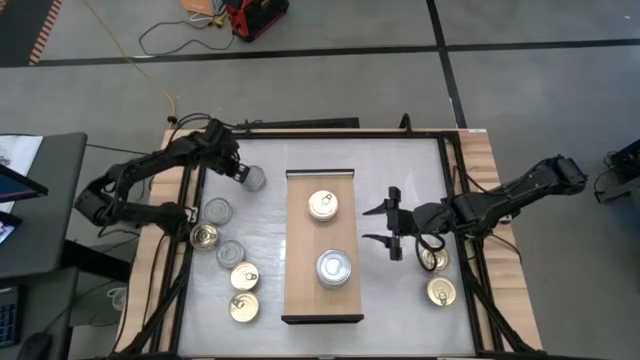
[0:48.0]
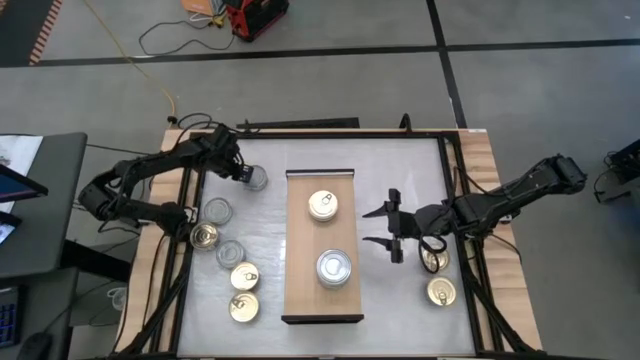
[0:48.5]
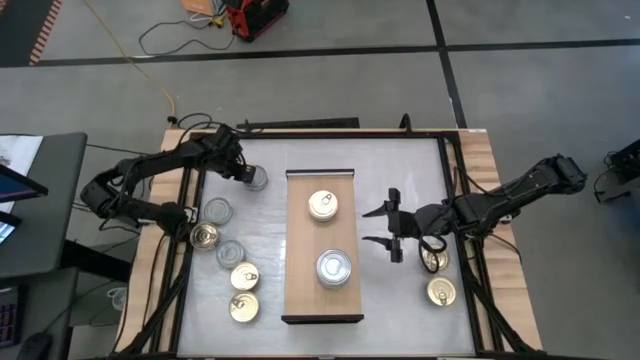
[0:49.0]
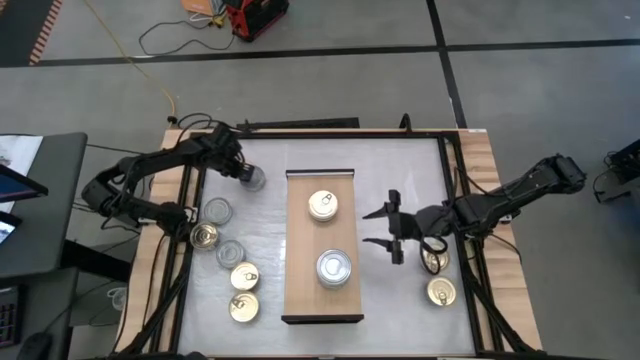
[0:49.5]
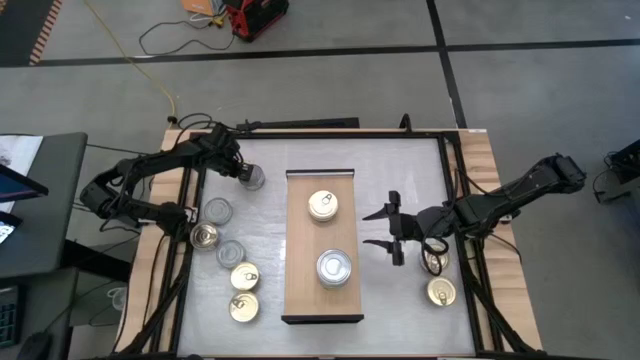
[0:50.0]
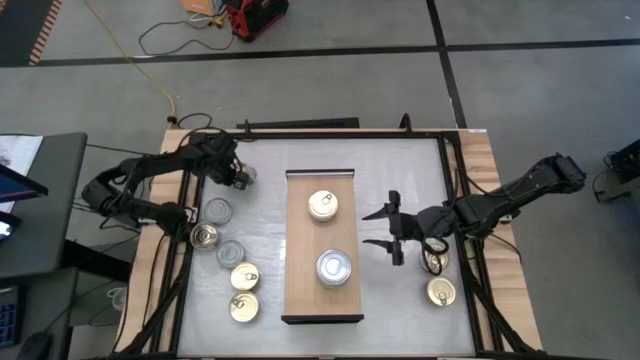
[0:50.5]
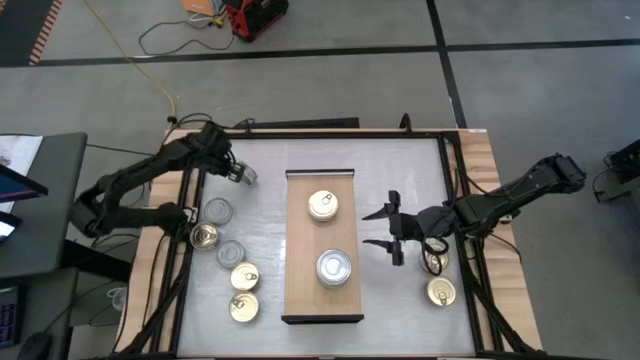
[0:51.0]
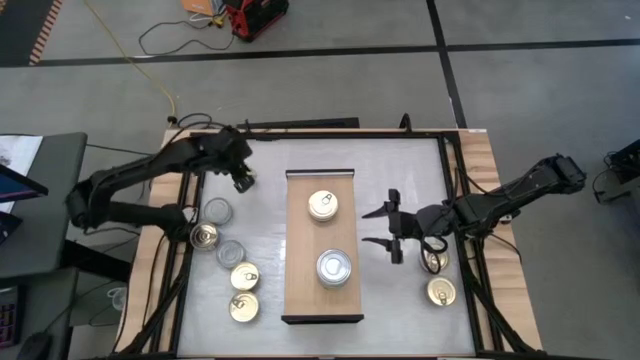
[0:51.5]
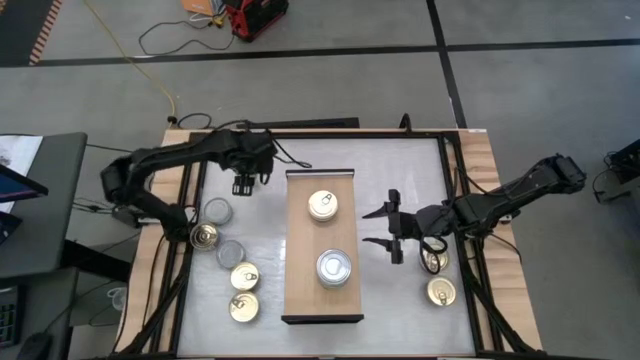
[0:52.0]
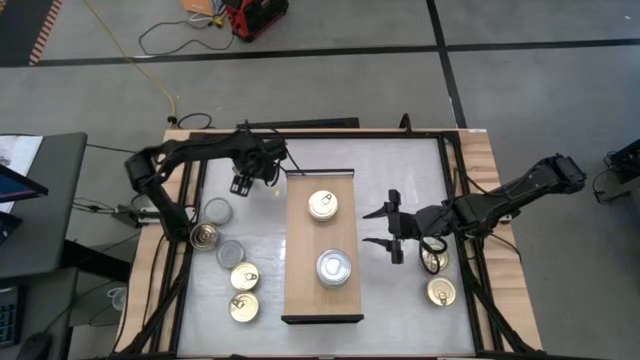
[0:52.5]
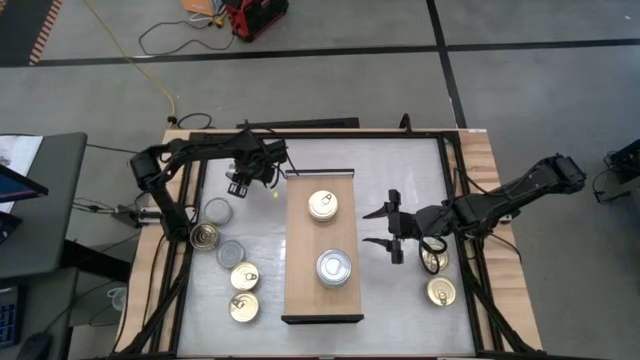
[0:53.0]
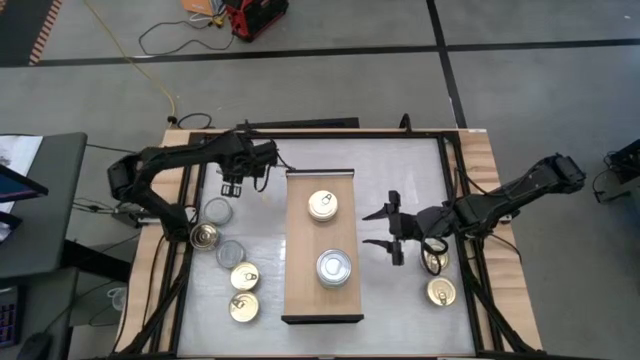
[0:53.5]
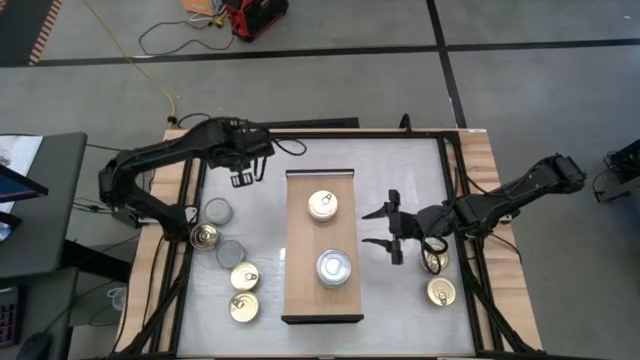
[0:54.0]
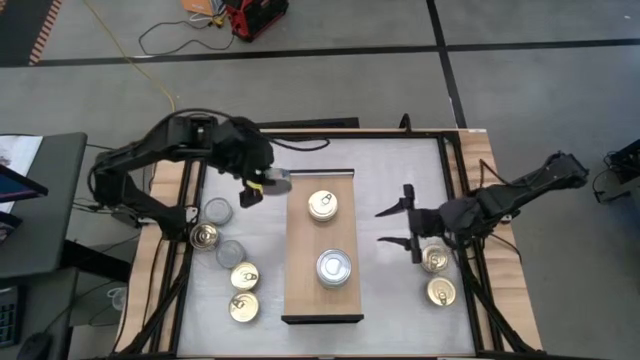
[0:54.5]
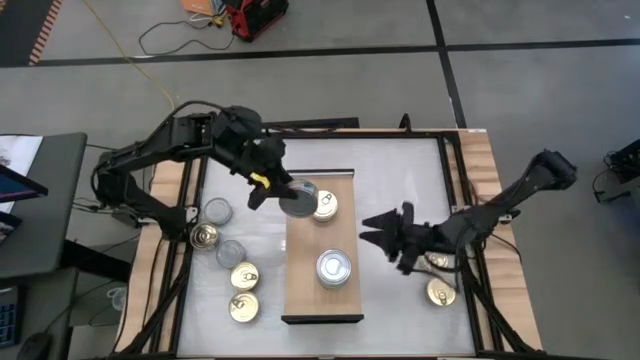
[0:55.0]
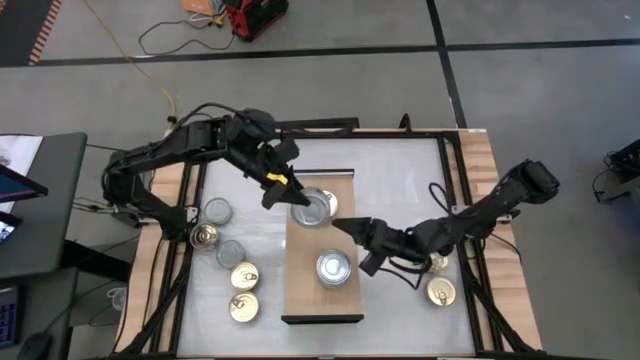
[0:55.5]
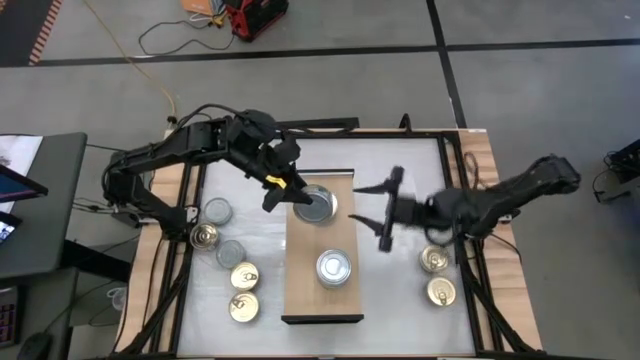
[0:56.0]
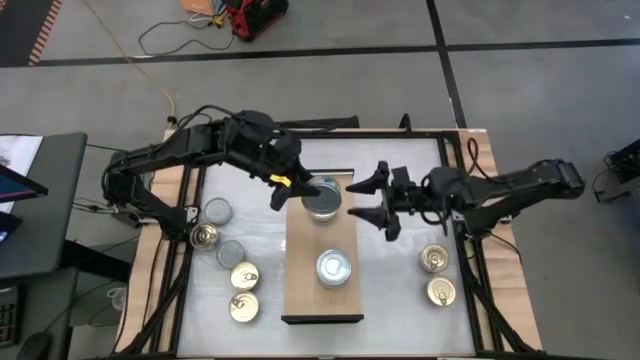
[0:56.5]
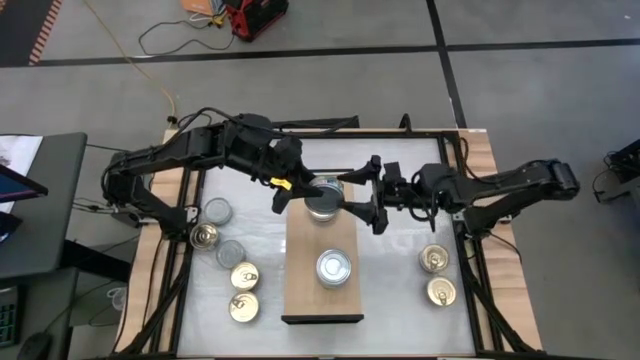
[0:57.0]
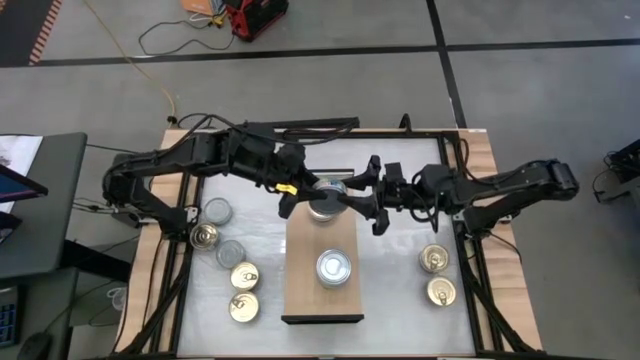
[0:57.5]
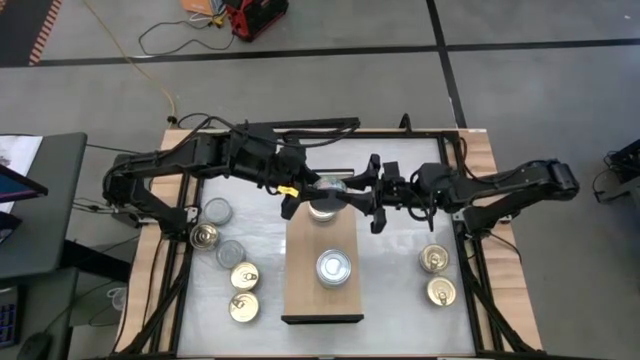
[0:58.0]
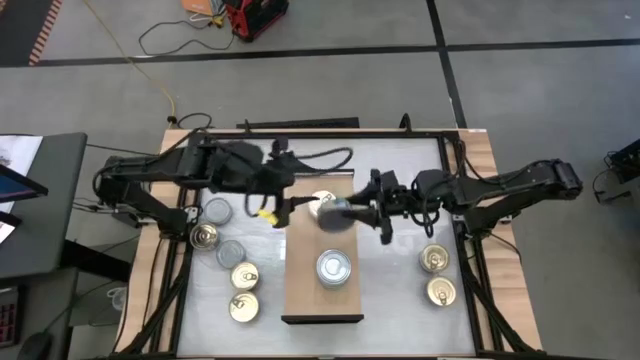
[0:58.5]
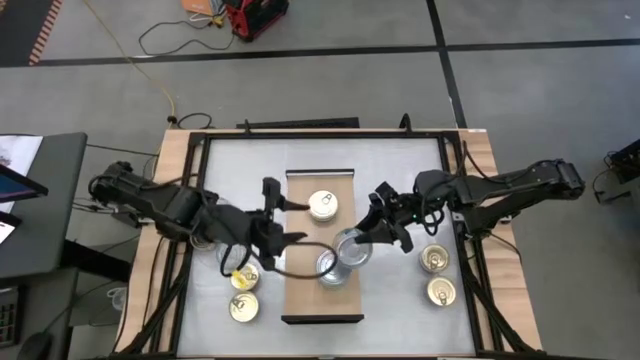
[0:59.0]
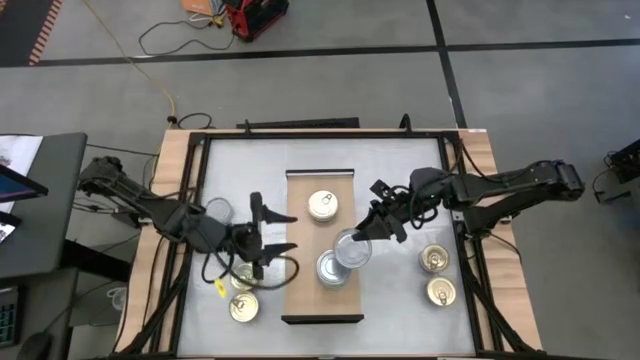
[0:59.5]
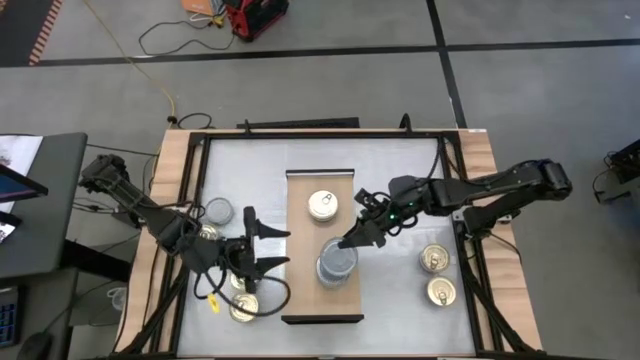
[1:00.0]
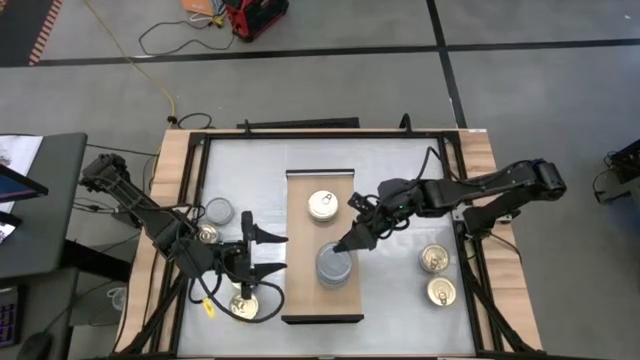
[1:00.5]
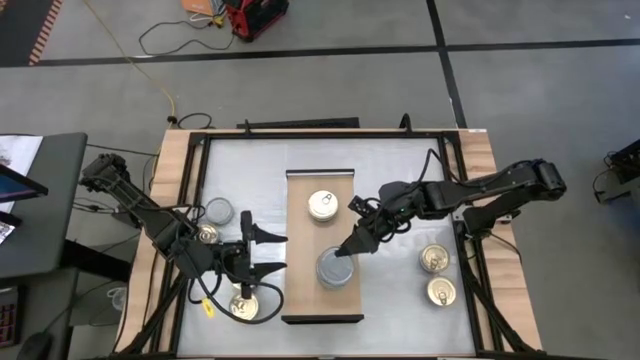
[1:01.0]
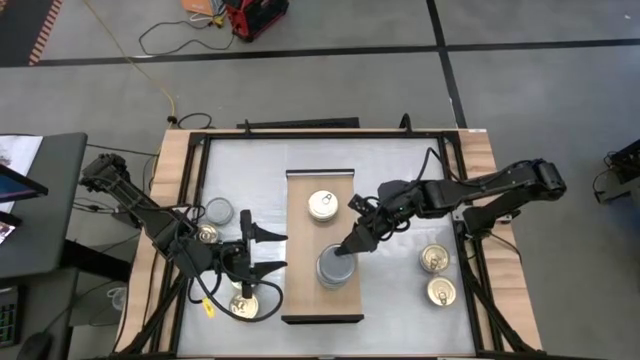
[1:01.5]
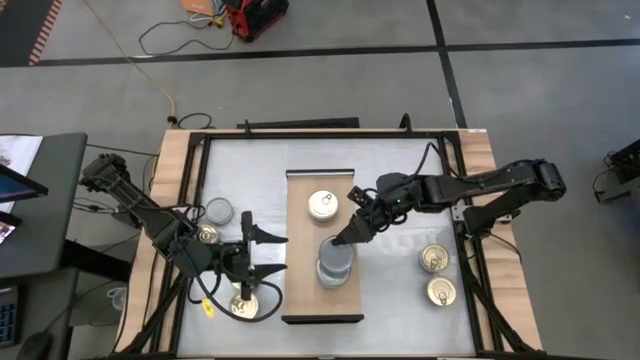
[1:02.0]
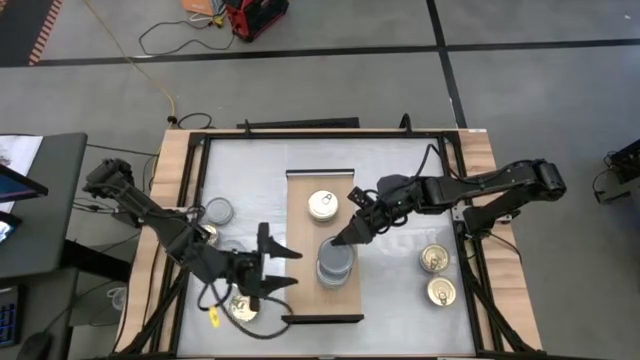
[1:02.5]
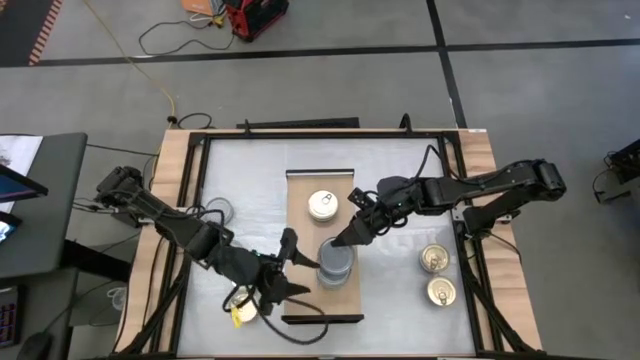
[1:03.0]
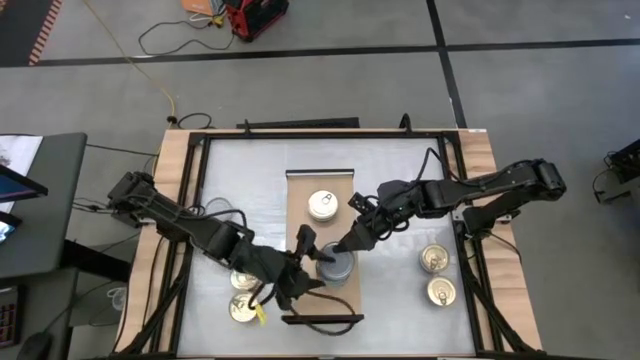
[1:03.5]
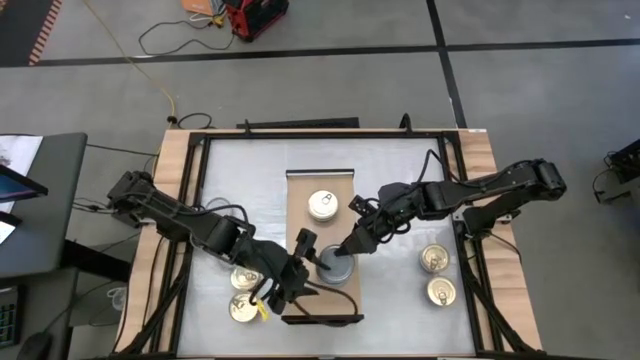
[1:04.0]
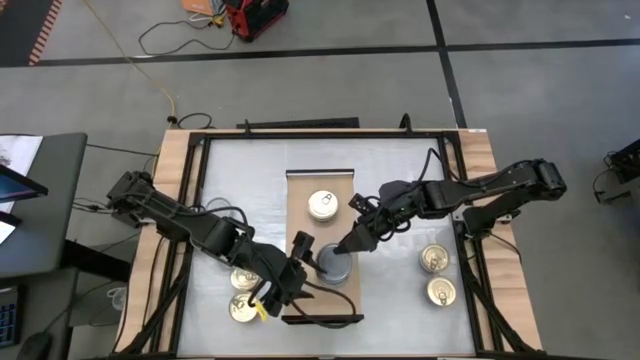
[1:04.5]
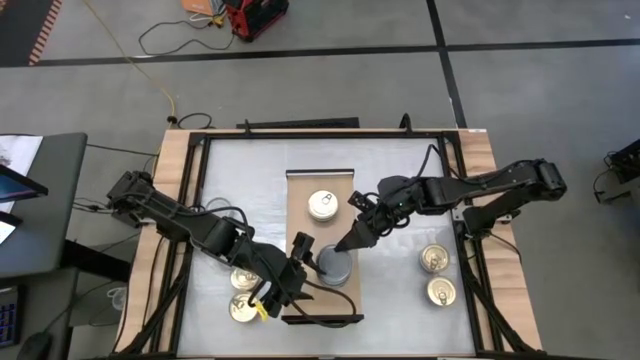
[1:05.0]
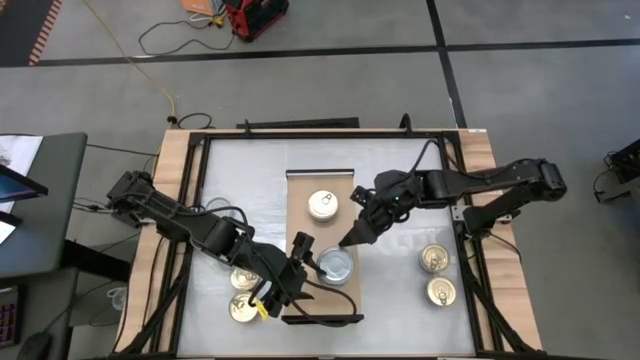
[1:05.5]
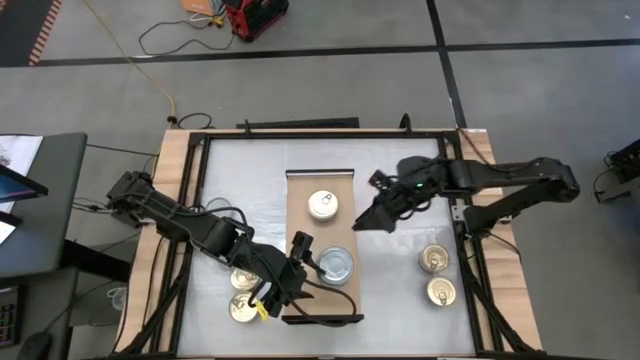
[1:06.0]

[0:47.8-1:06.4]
Task: Stack canned seafood by type on shelf
Stack the green tuna can on top of the stacked green tuna cans on the shelf

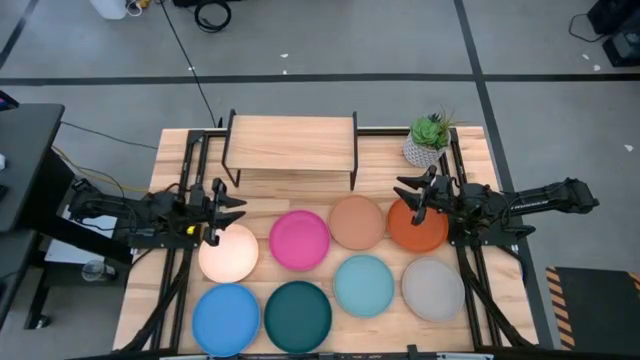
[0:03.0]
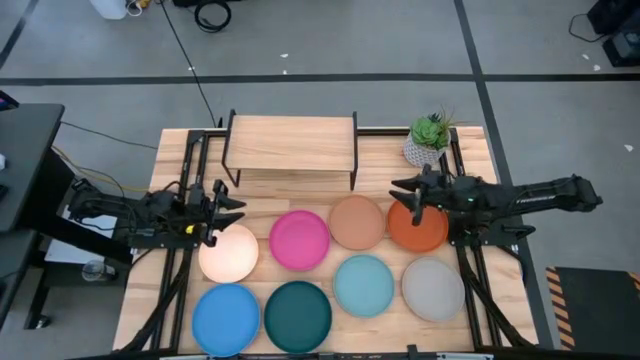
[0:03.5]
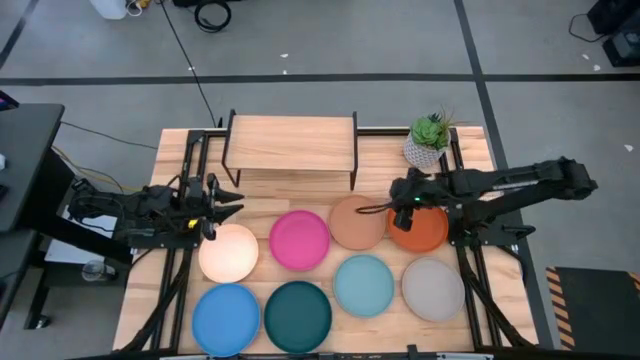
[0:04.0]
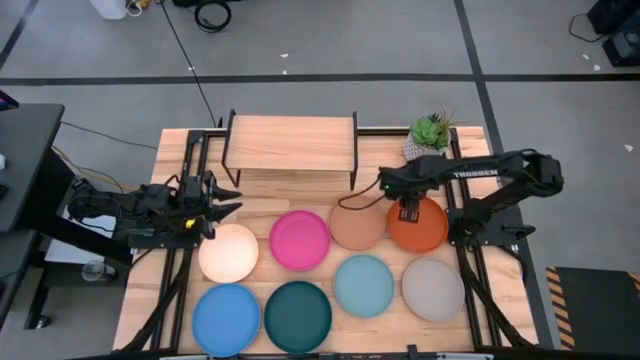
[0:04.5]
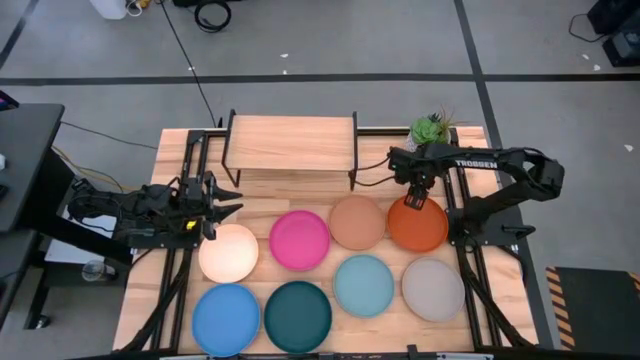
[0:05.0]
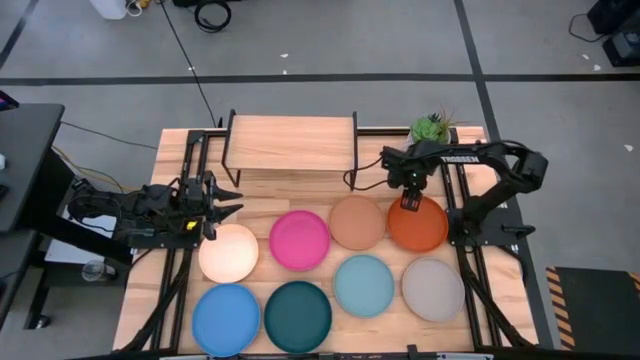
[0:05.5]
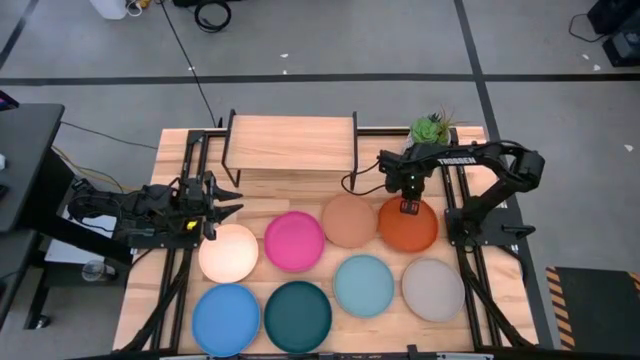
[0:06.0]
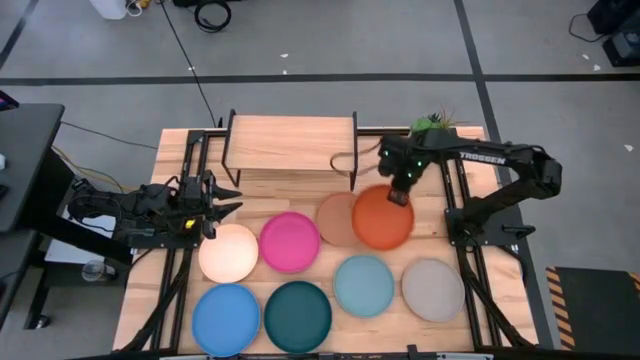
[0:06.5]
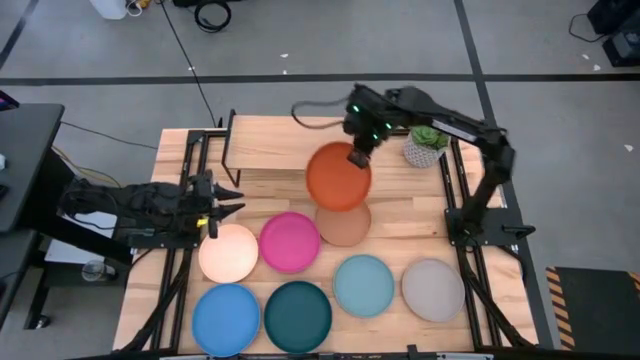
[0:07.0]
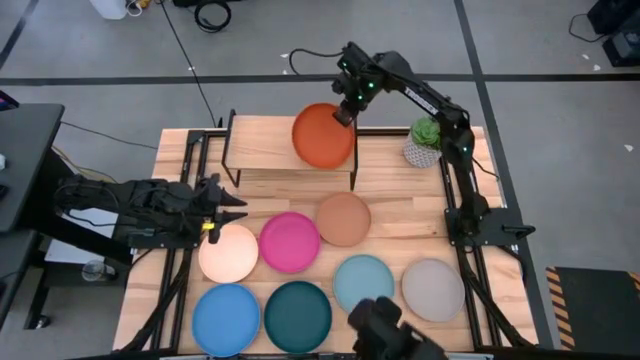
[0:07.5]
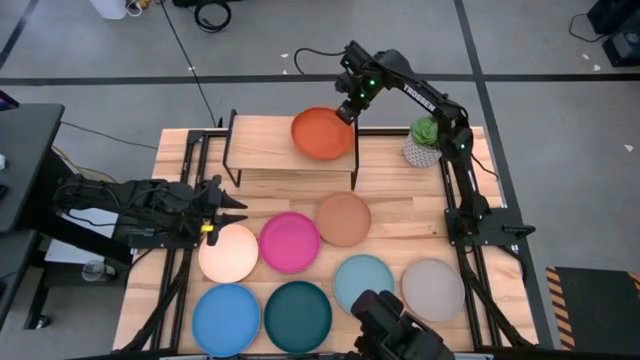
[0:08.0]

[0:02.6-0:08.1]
Task: Place and stack plates onto a shelf
Put the dark orange plate on the shelf
